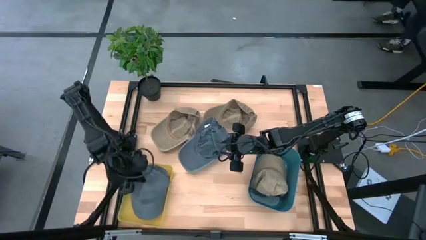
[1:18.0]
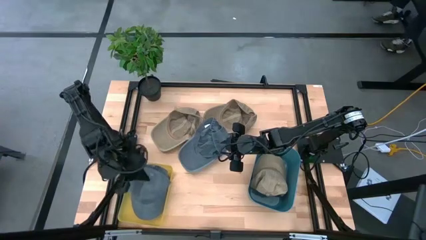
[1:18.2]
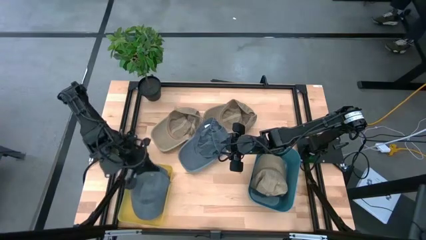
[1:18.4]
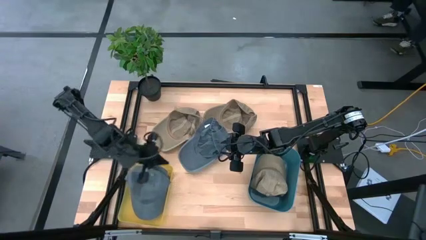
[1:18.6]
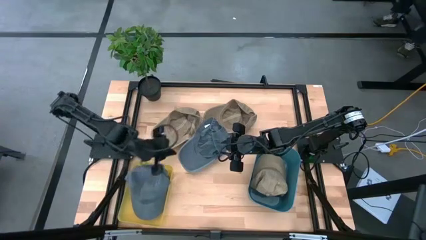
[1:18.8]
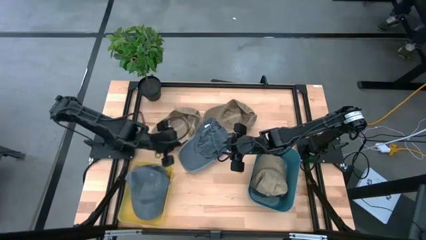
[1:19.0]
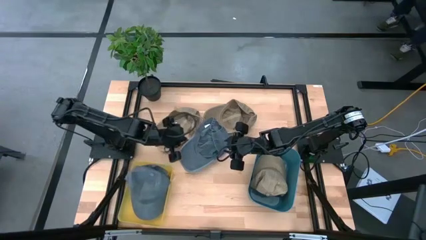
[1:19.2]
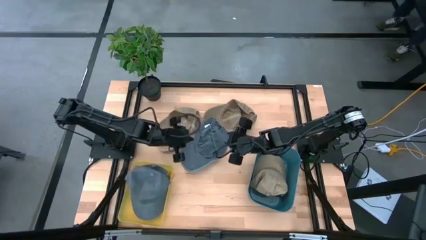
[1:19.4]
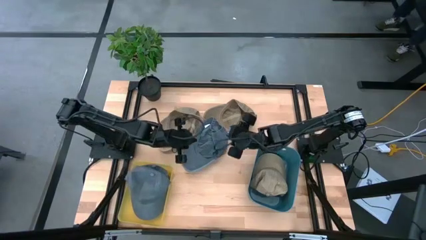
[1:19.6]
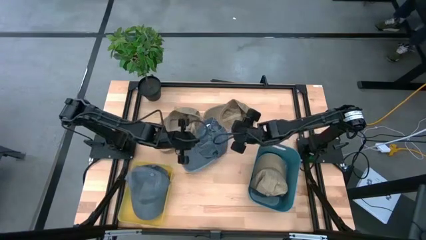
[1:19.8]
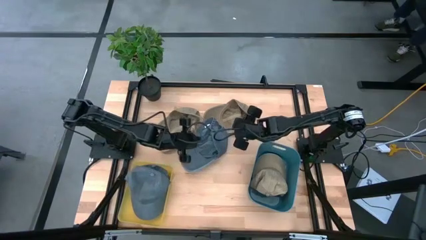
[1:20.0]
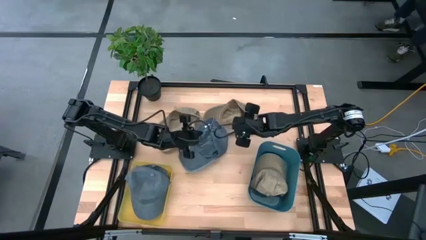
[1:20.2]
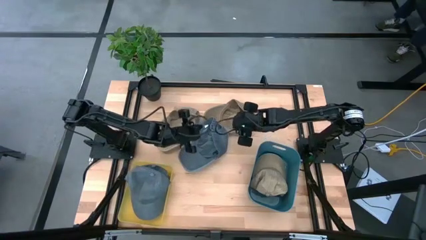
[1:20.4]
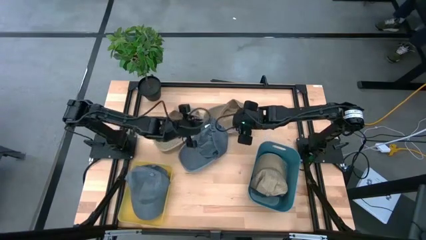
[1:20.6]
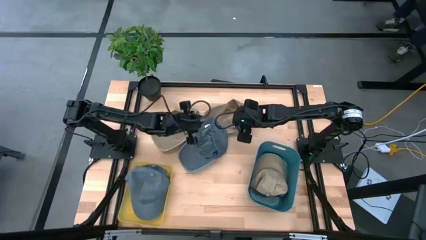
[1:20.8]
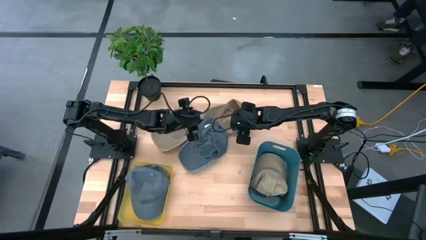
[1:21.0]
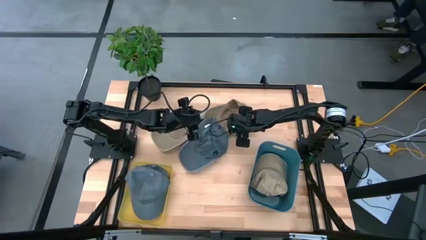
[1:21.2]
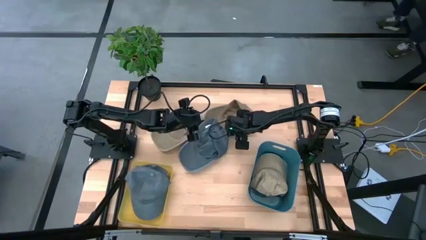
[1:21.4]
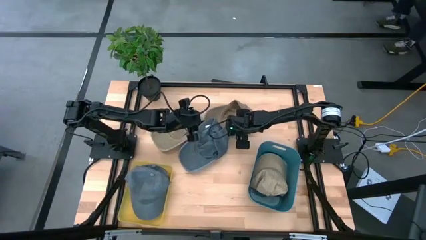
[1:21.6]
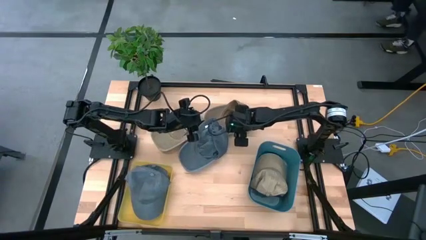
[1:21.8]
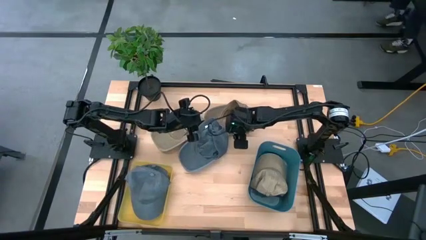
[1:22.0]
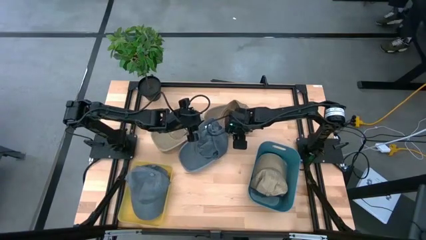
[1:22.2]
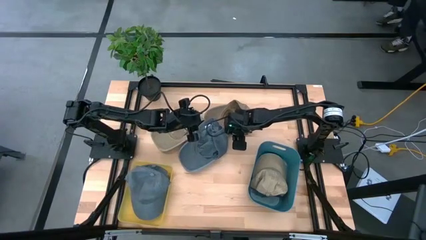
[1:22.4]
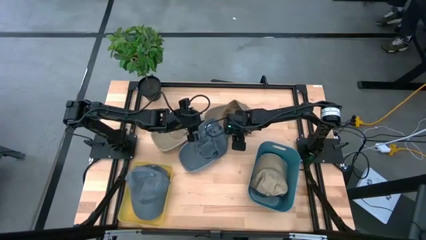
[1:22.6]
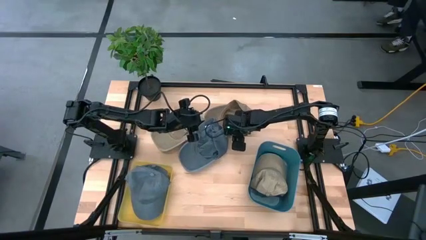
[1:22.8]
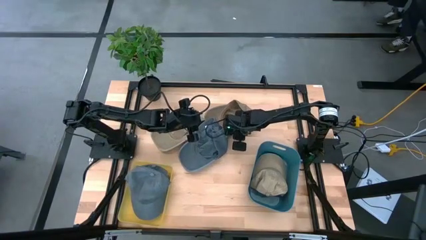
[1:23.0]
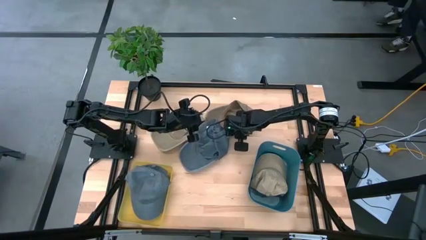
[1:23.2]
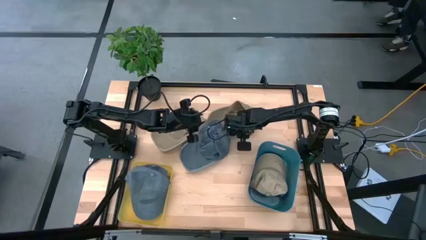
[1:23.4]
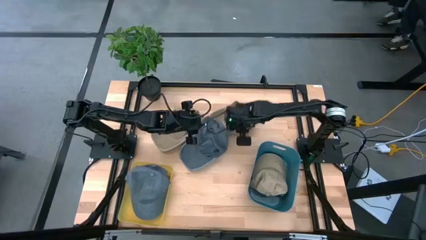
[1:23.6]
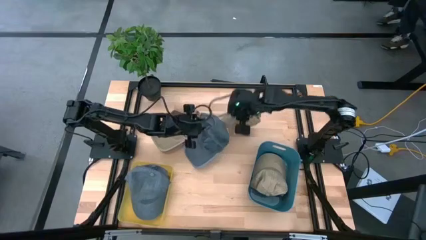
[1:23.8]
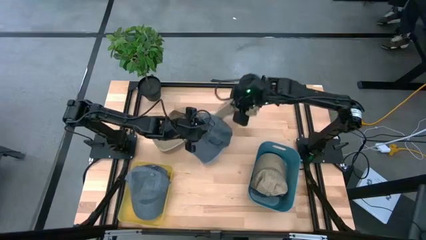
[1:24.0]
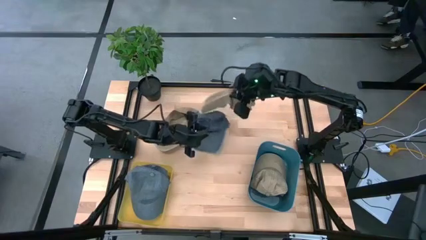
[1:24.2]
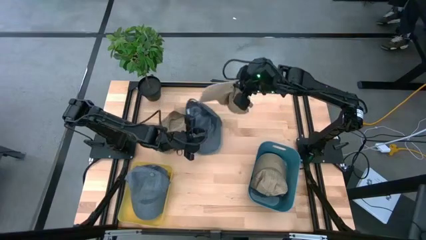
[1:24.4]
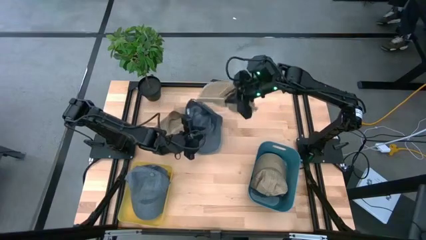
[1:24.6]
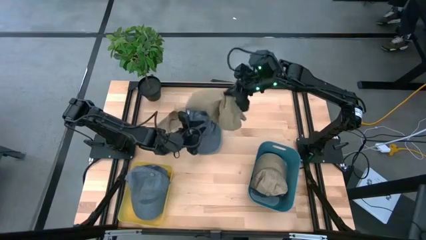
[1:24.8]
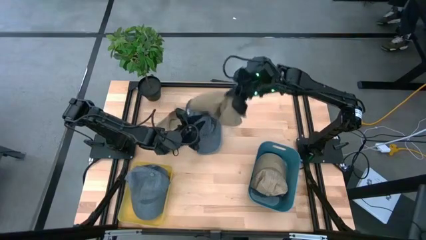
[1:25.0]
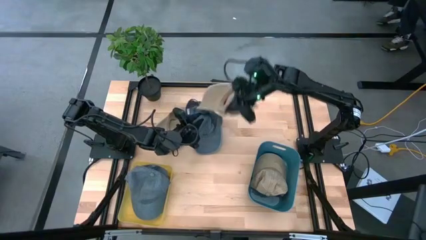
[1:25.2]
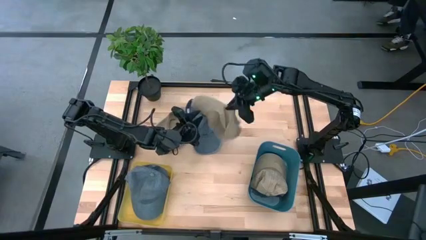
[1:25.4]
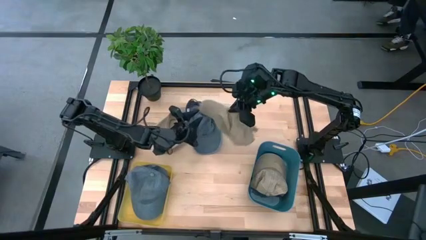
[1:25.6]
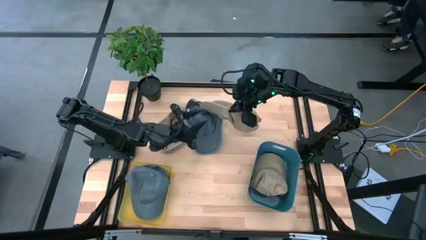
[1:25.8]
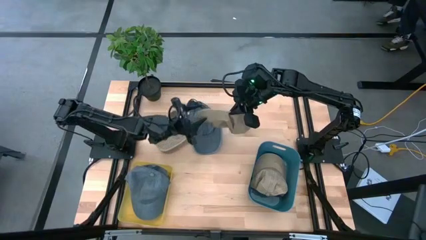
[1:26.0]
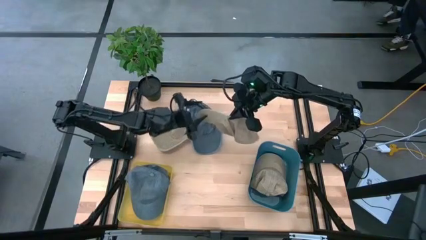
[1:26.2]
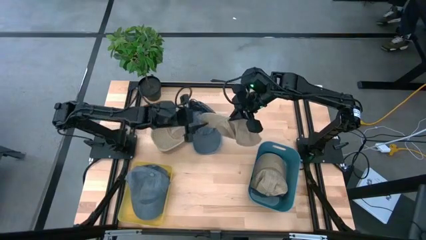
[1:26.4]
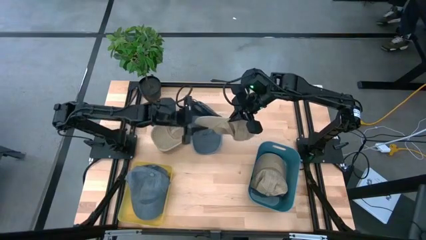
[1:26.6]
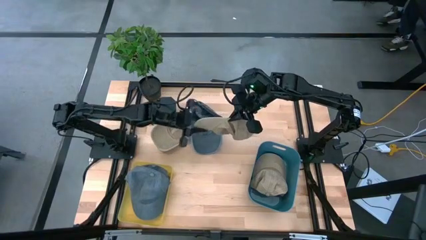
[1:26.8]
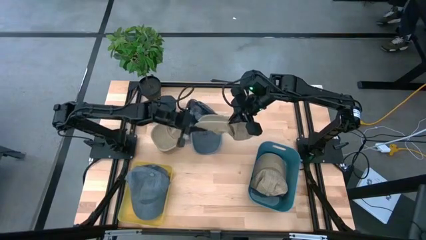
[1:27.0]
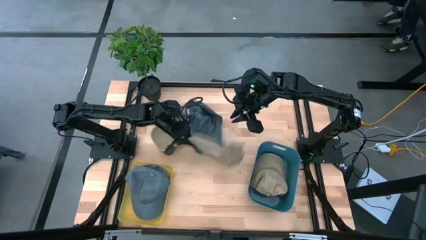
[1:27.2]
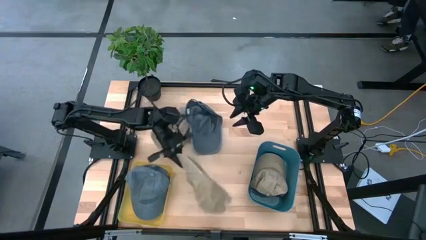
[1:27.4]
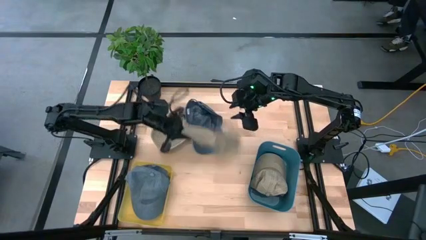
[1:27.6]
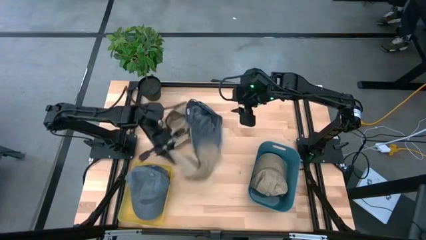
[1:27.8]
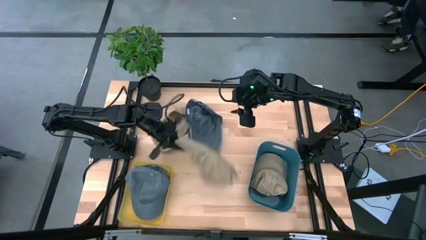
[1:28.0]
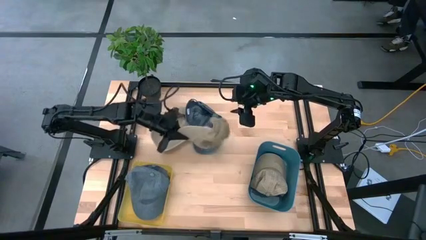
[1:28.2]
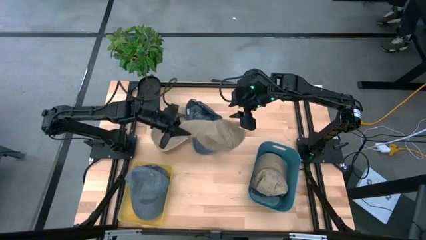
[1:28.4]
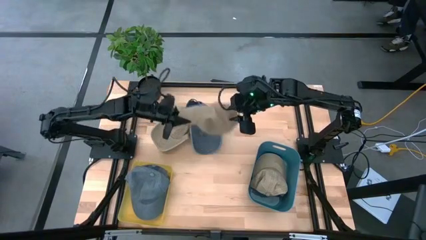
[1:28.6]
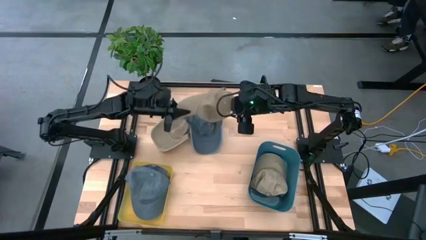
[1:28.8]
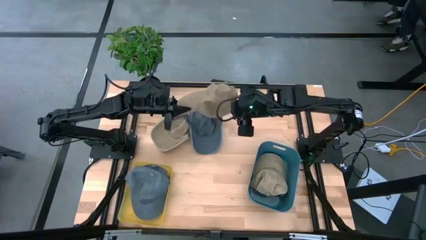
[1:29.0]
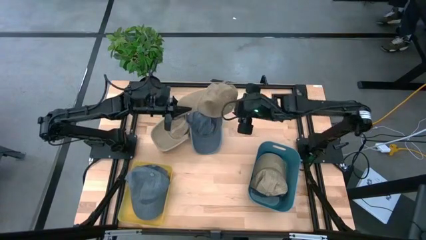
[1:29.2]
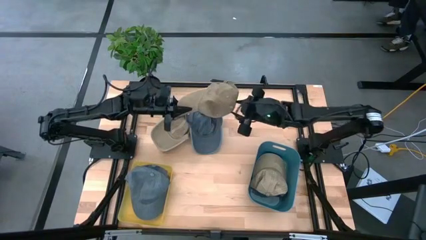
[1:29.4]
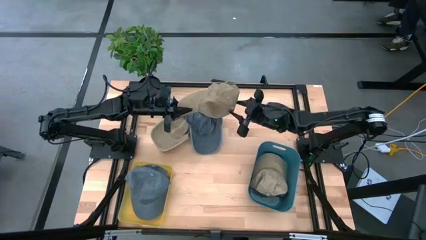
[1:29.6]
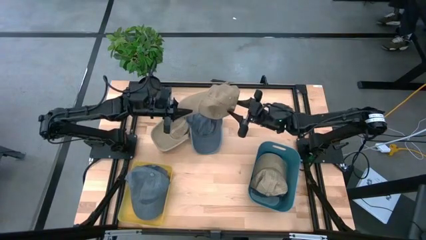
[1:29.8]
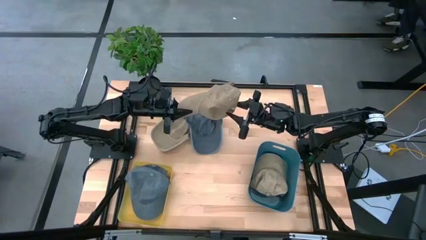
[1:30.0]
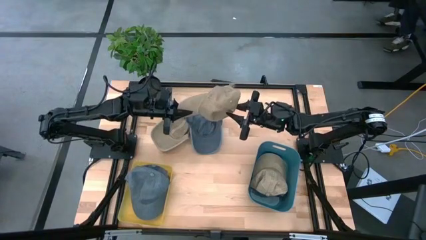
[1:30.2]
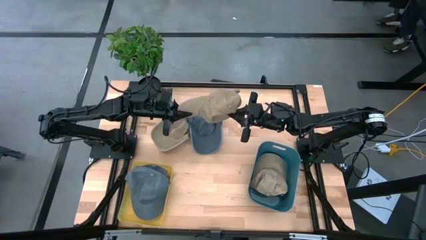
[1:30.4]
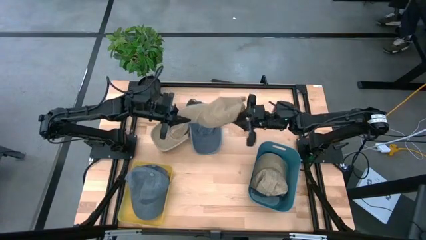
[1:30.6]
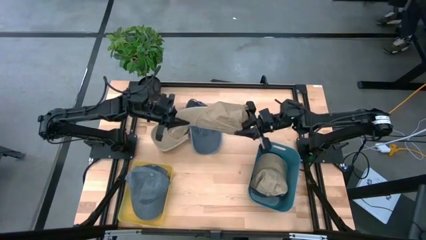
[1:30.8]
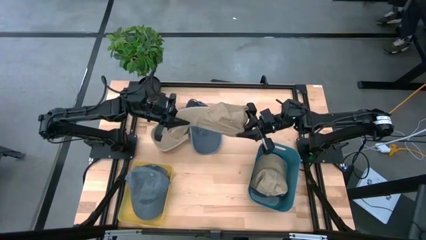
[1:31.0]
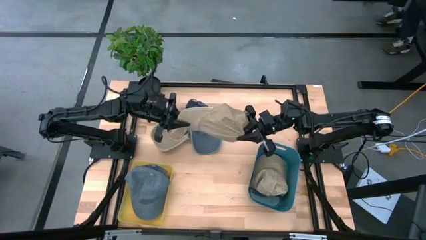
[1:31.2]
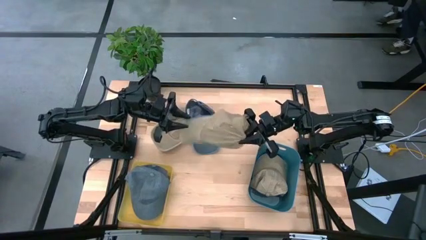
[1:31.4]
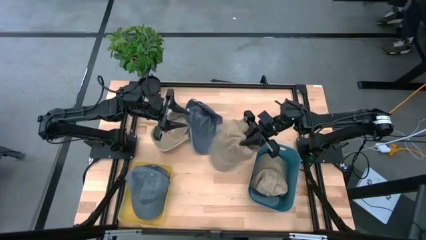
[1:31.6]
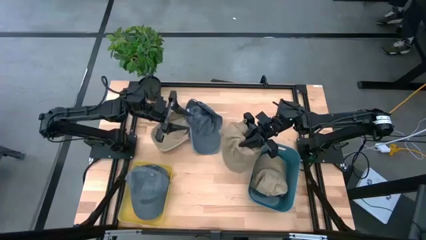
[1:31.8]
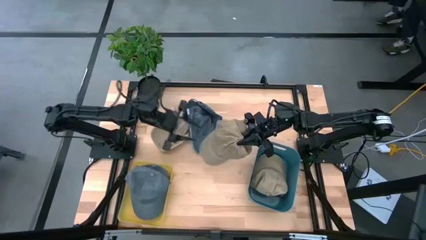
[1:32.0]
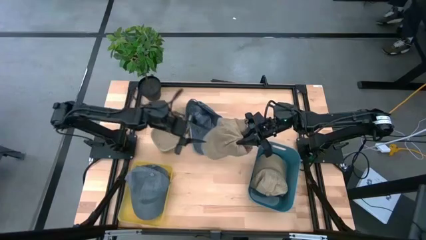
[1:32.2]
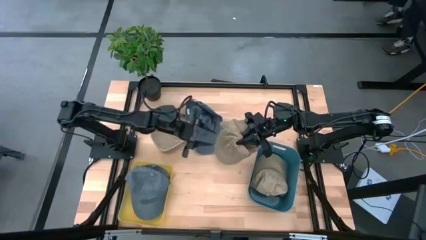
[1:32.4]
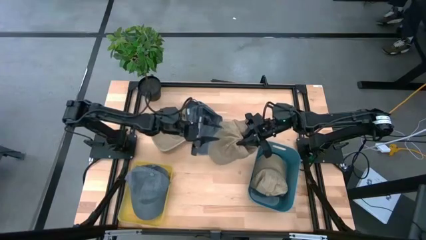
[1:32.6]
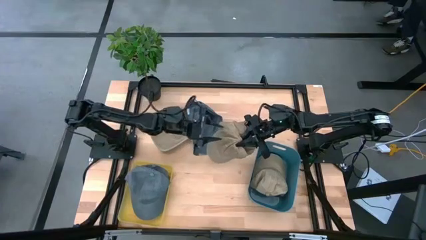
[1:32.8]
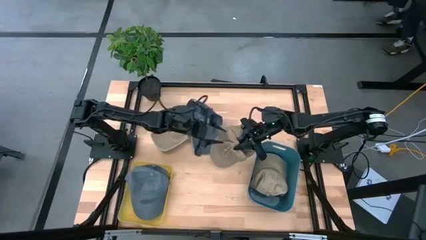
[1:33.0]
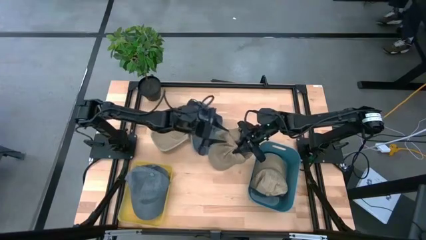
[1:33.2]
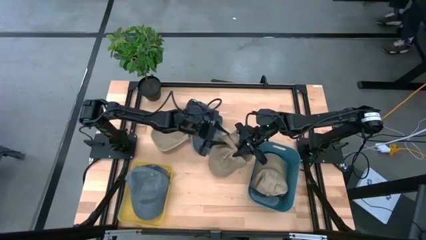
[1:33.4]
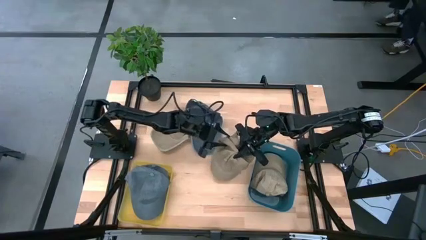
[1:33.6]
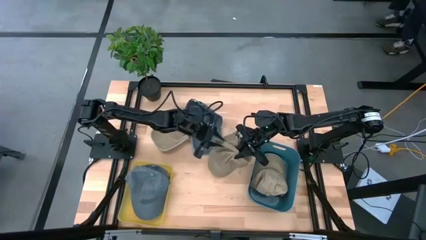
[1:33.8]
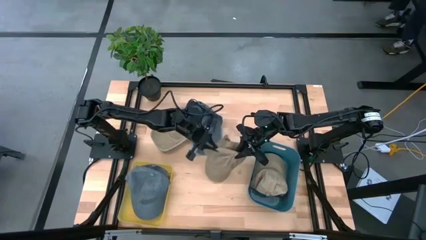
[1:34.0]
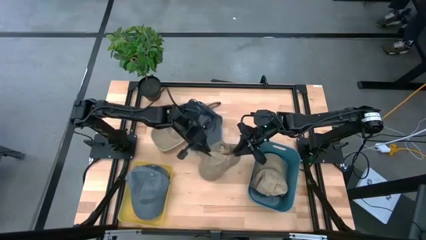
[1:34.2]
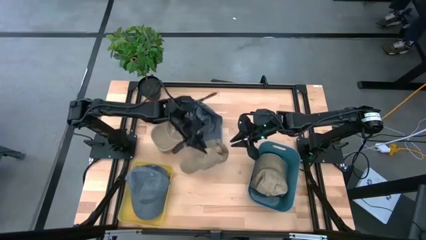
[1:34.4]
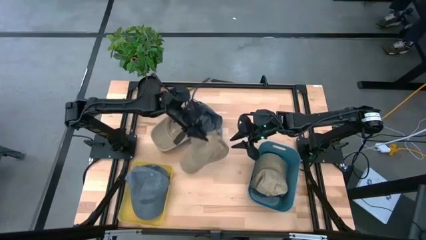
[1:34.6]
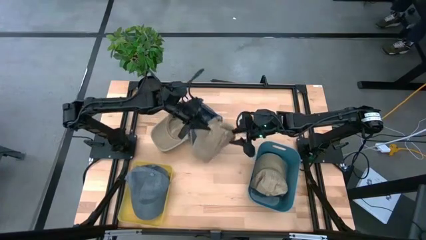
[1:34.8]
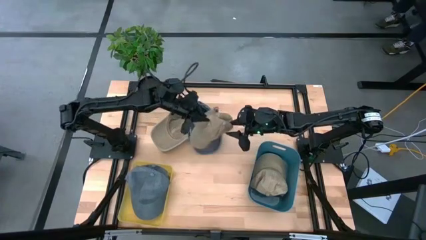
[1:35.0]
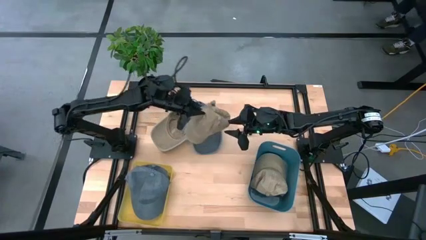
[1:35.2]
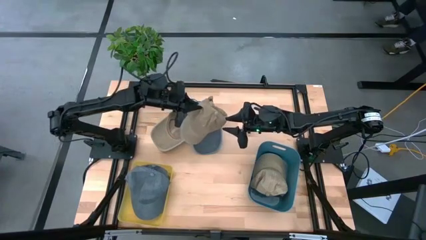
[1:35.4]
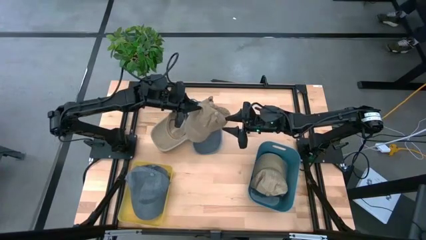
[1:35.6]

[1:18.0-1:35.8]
Task: Pick & Place hat
Put the right brown cap into the blue bin
